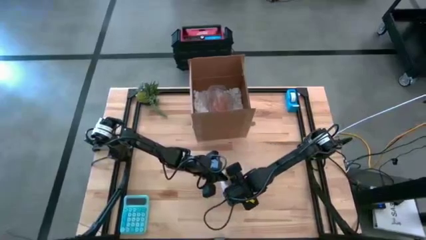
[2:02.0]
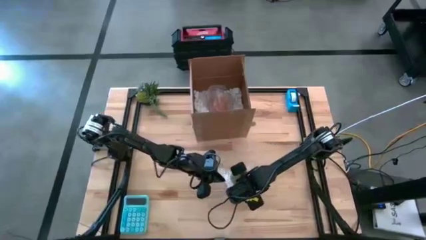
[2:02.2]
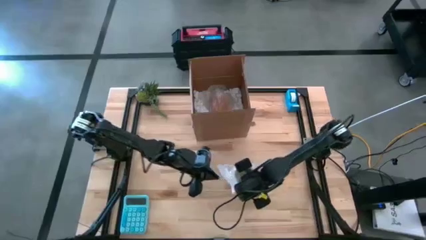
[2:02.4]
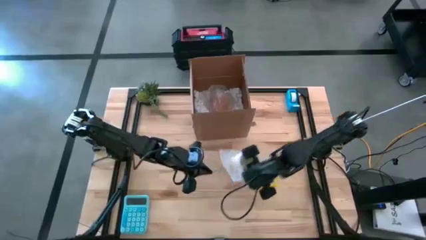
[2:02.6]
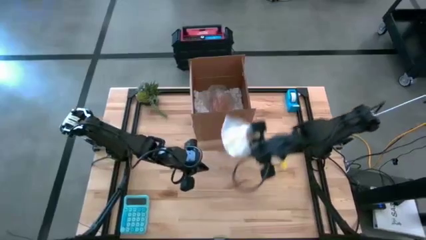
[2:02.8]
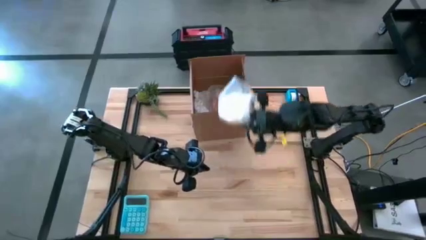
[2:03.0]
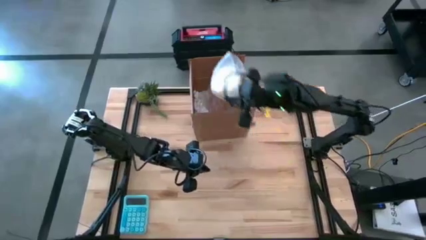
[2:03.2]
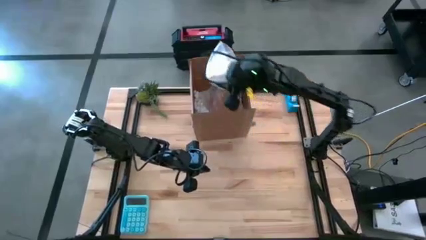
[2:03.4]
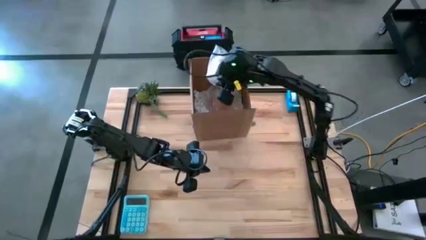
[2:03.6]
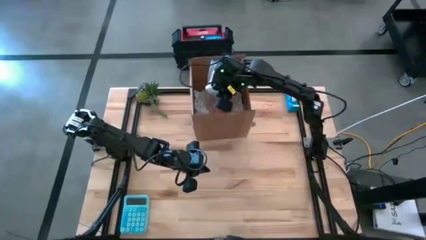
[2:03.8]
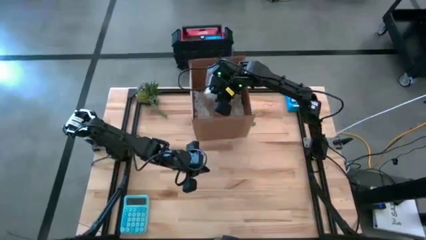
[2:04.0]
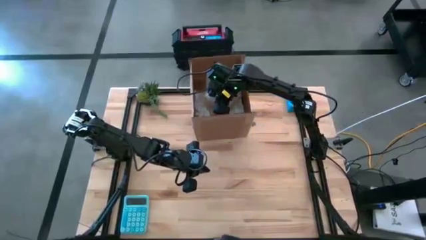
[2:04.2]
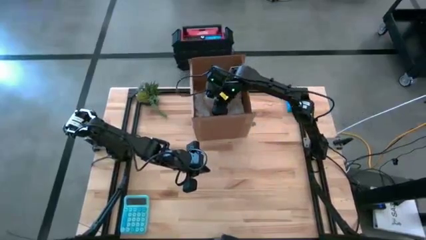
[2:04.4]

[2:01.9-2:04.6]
Task: wrap mug
Put the wrapped yellow mug into the box

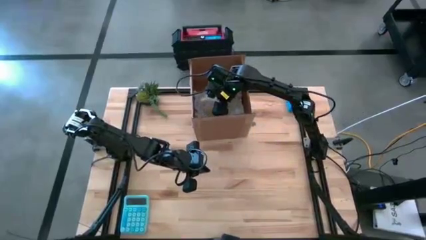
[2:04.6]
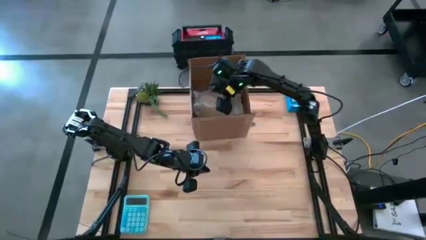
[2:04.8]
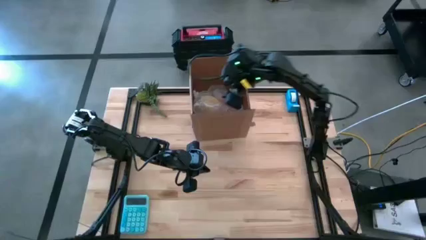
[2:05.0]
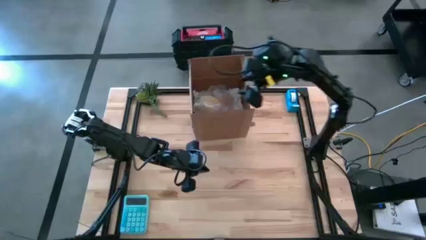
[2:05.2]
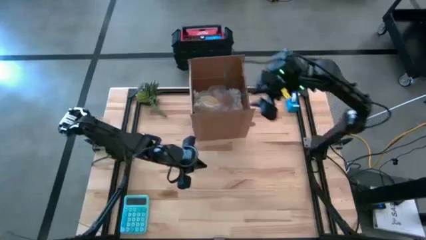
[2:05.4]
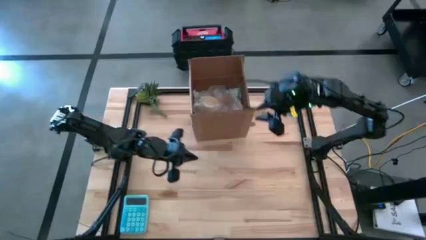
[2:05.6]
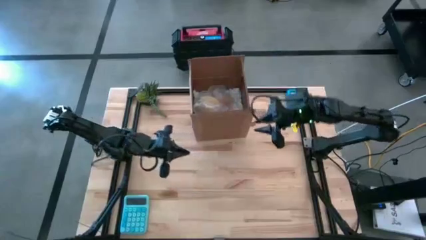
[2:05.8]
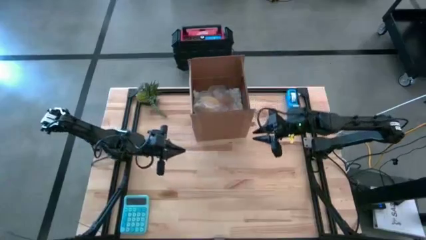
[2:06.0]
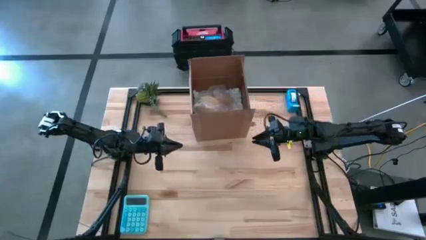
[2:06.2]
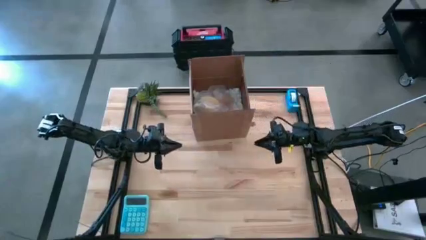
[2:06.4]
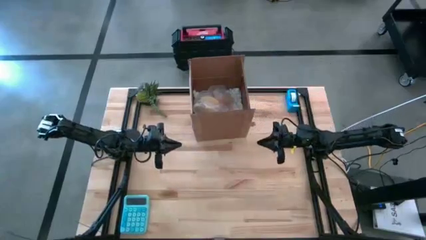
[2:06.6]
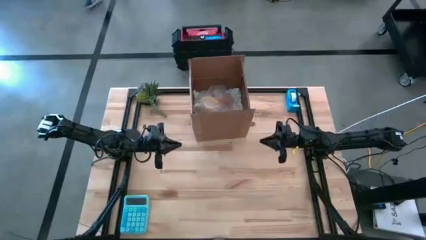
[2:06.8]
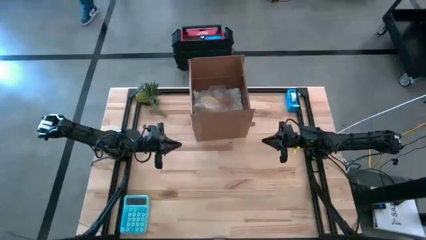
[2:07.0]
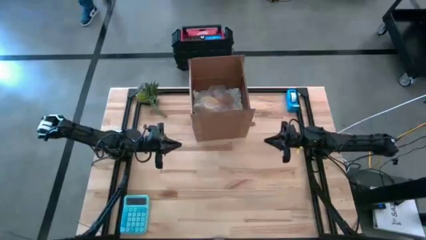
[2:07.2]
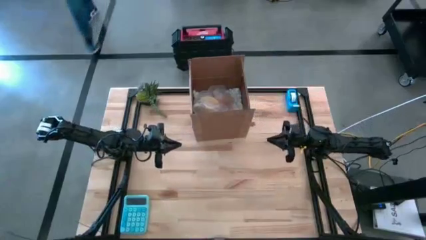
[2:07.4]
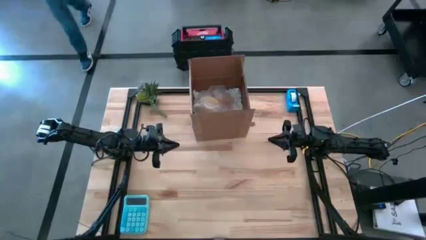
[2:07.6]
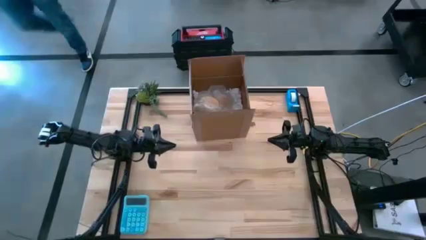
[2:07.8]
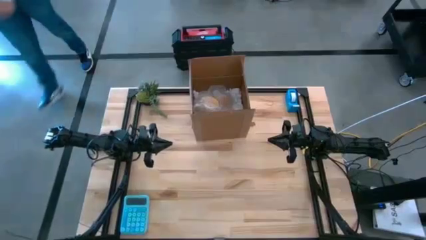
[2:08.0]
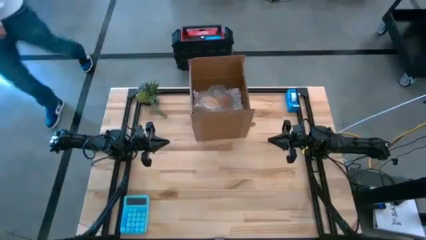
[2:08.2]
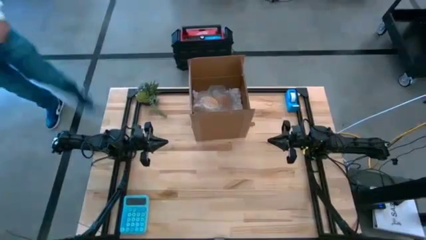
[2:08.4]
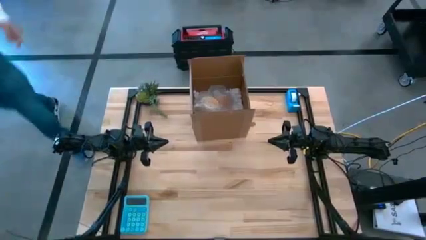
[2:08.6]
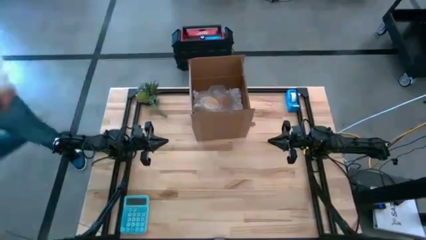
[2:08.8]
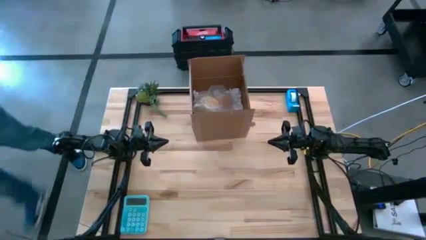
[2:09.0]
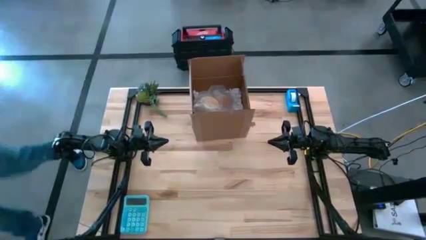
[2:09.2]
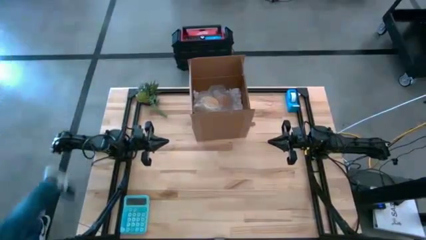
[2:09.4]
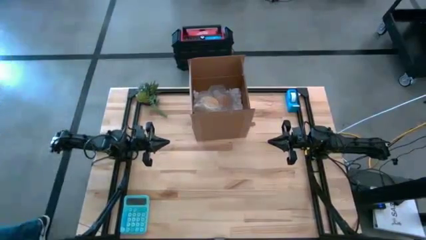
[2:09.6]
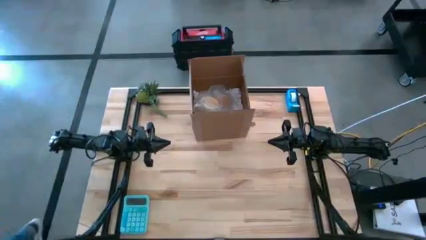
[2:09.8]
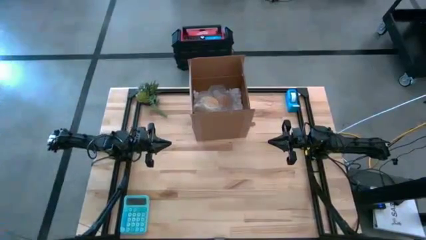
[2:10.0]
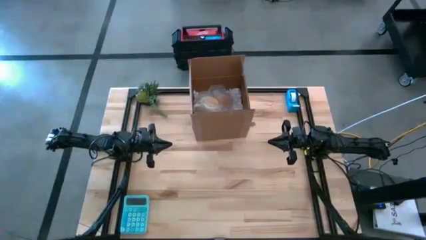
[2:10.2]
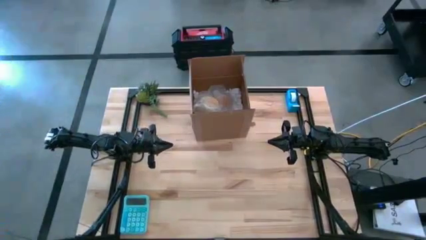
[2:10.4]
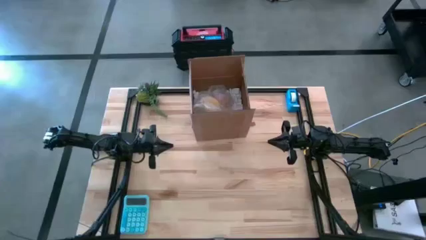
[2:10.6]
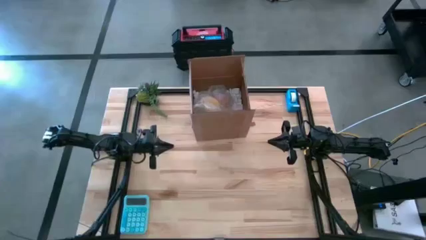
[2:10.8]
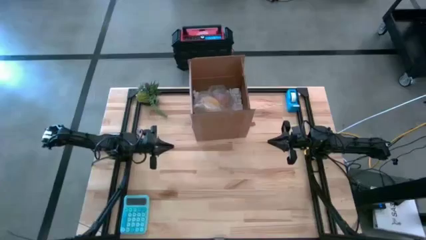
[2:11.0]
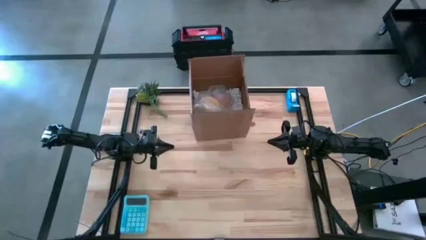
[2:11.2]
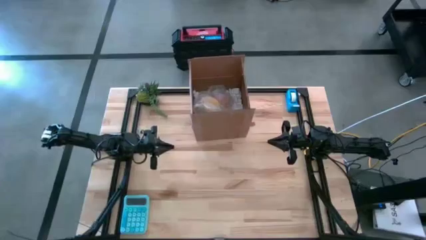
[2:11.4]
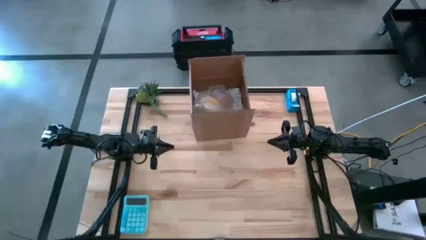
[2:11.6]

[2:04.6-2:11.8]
Return to Home Position
